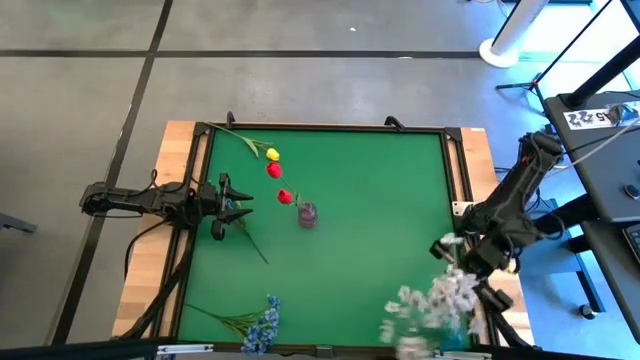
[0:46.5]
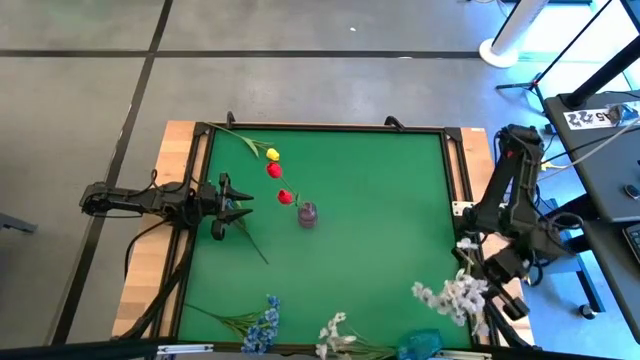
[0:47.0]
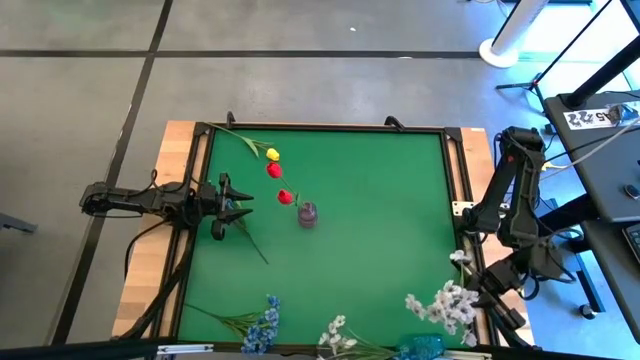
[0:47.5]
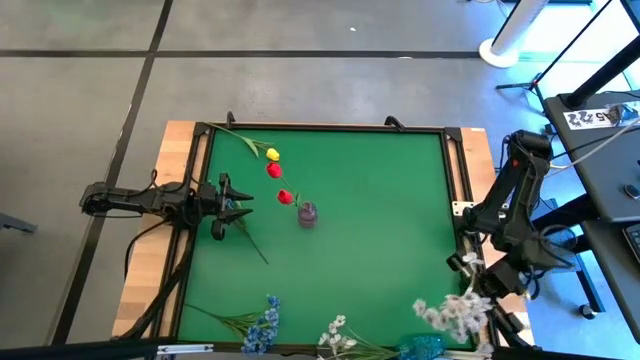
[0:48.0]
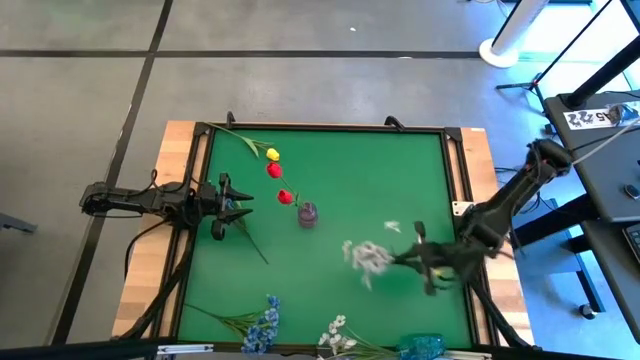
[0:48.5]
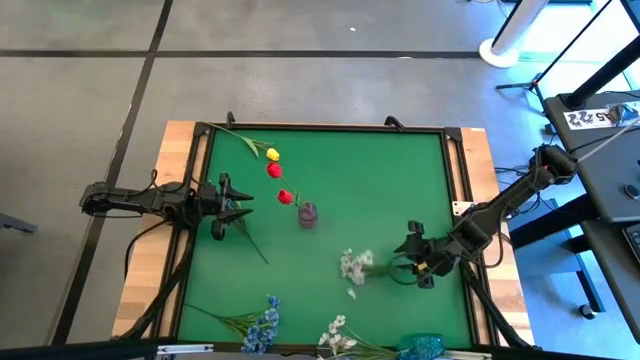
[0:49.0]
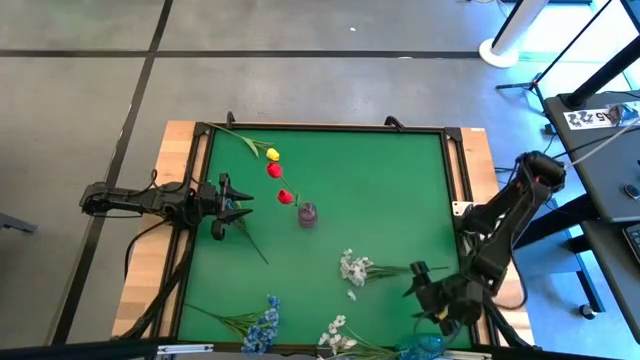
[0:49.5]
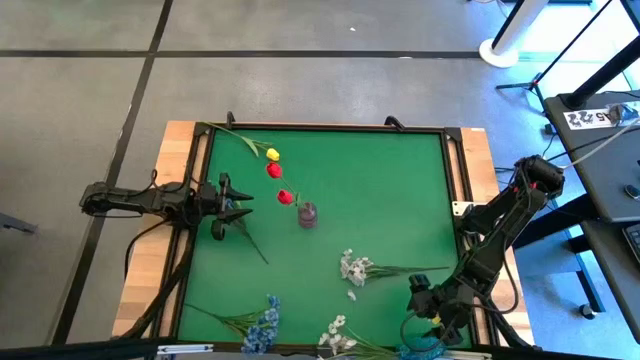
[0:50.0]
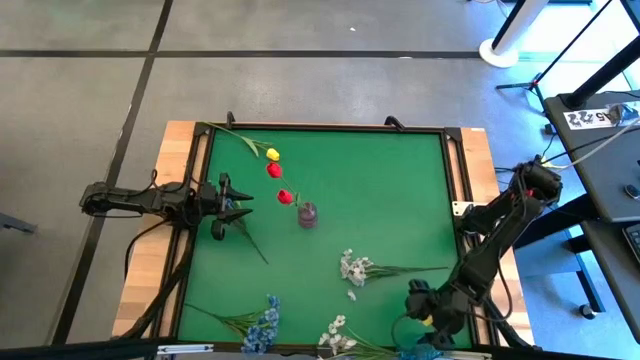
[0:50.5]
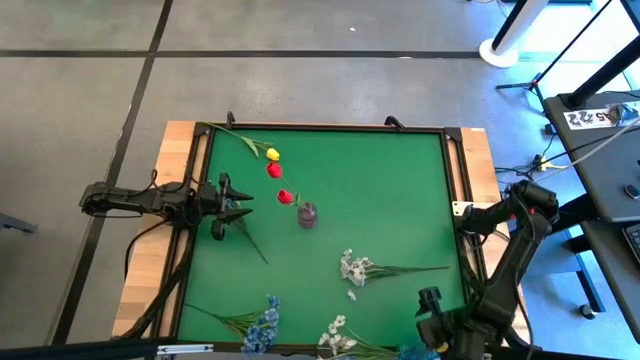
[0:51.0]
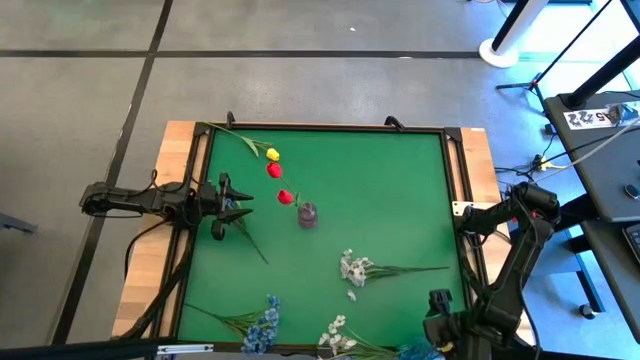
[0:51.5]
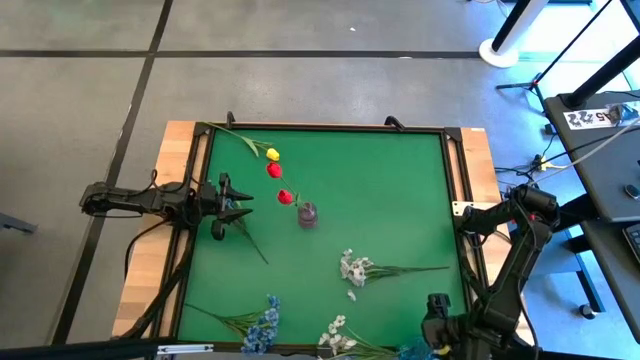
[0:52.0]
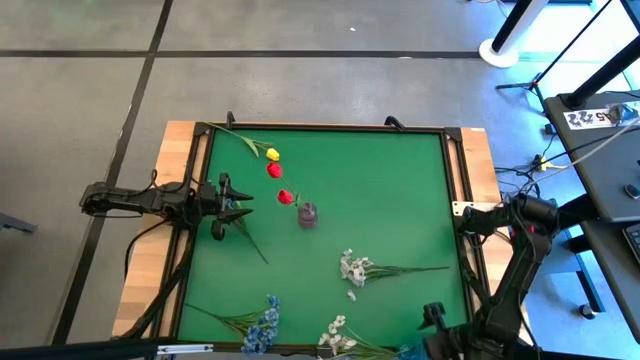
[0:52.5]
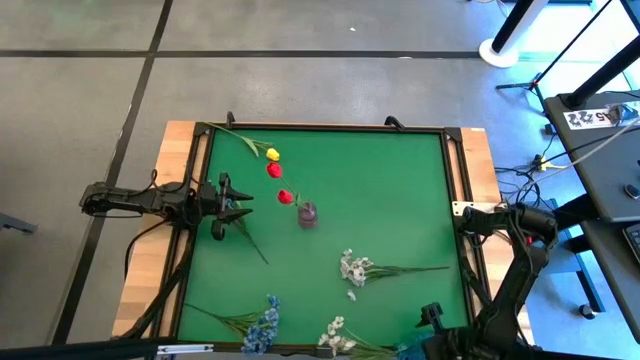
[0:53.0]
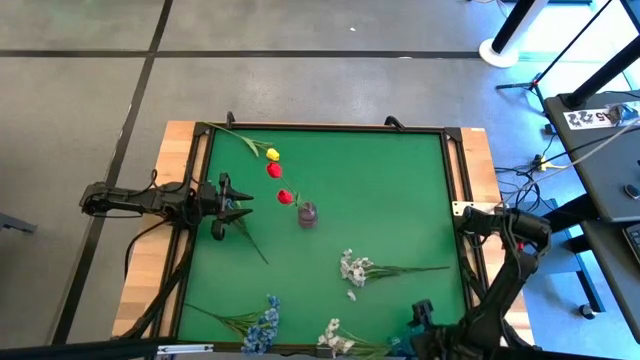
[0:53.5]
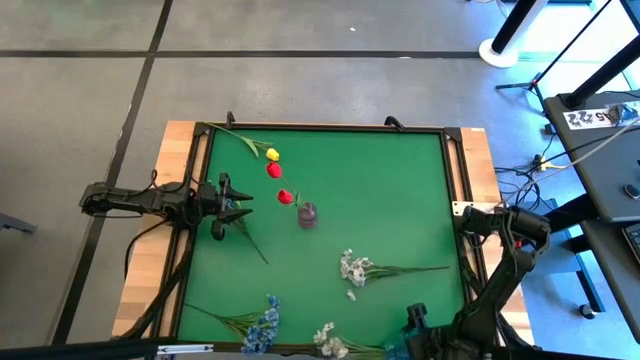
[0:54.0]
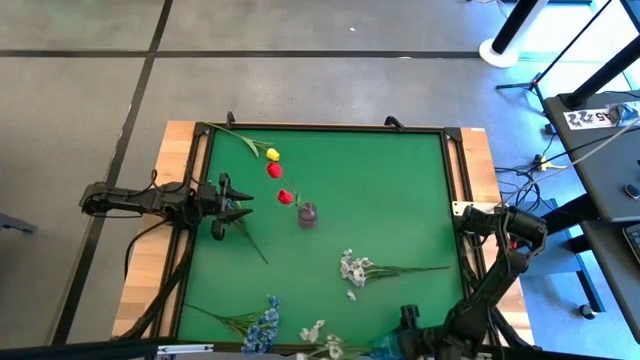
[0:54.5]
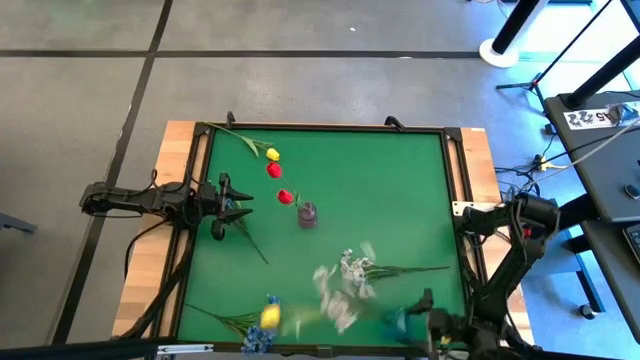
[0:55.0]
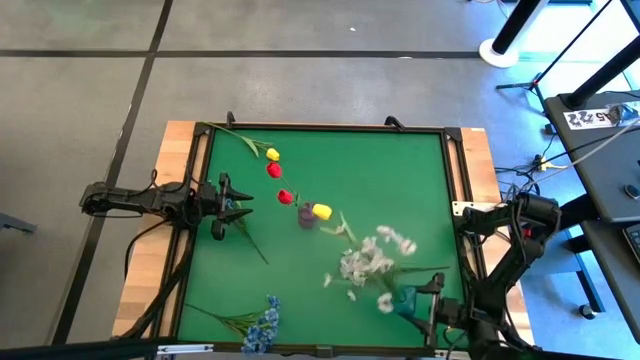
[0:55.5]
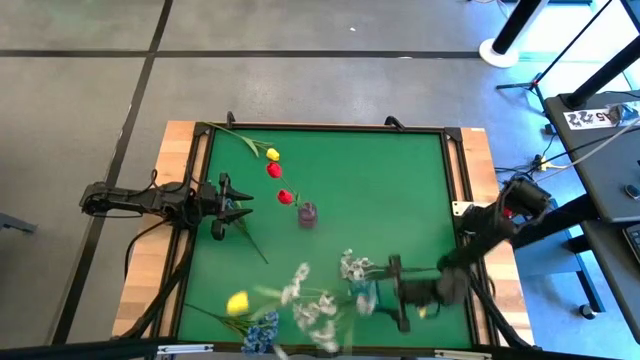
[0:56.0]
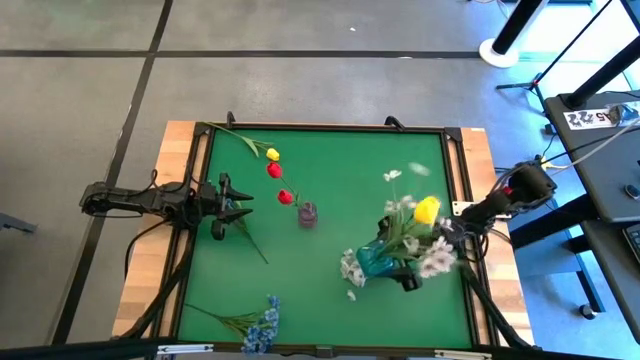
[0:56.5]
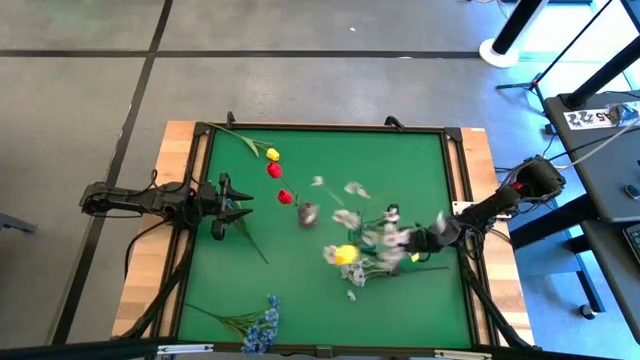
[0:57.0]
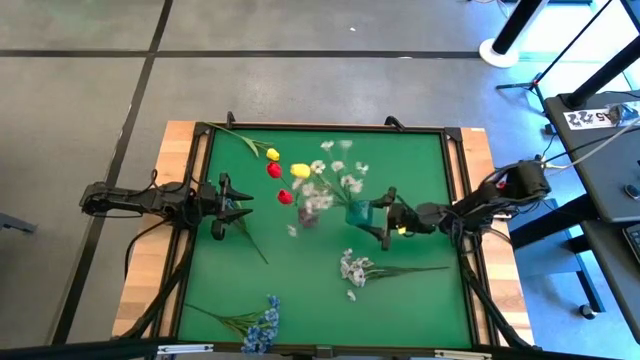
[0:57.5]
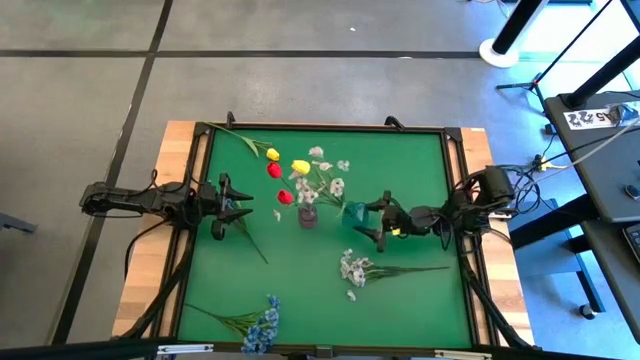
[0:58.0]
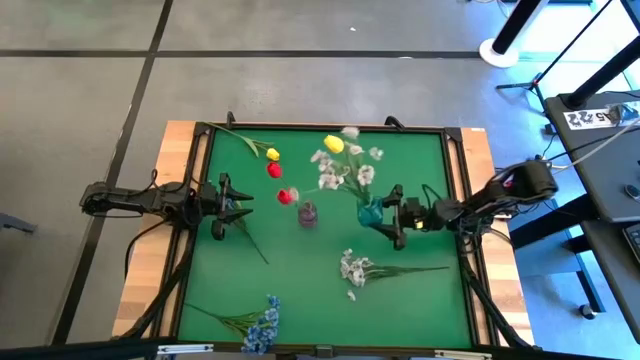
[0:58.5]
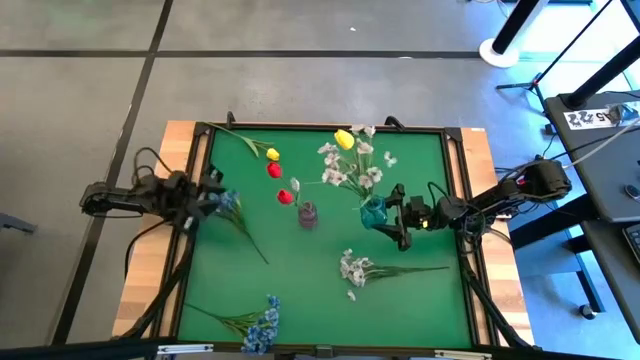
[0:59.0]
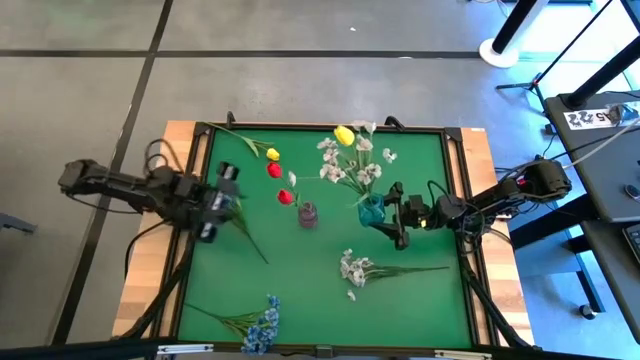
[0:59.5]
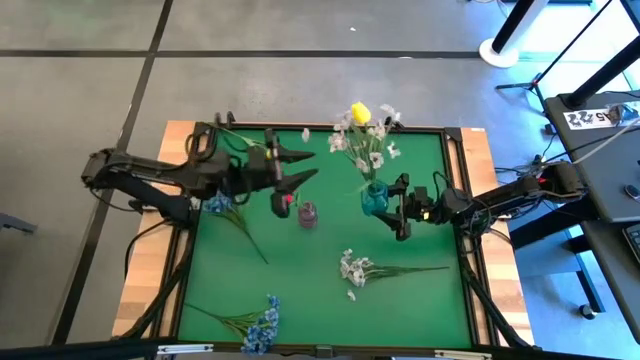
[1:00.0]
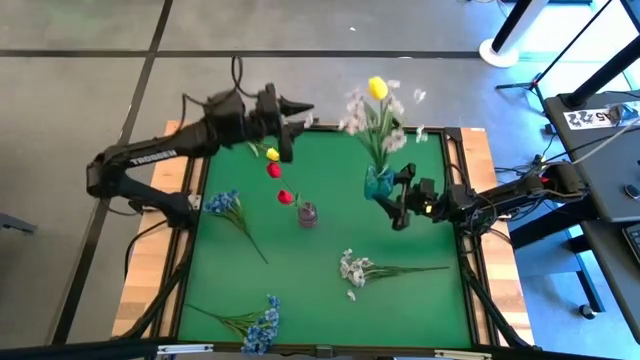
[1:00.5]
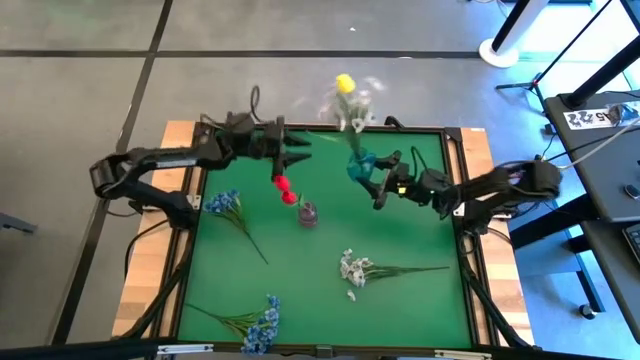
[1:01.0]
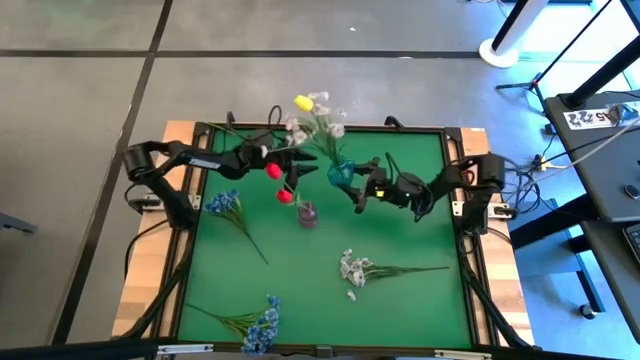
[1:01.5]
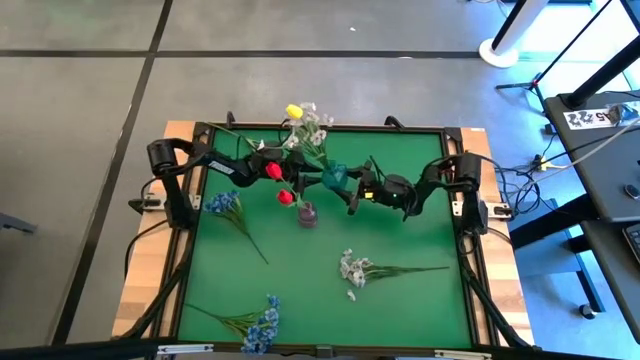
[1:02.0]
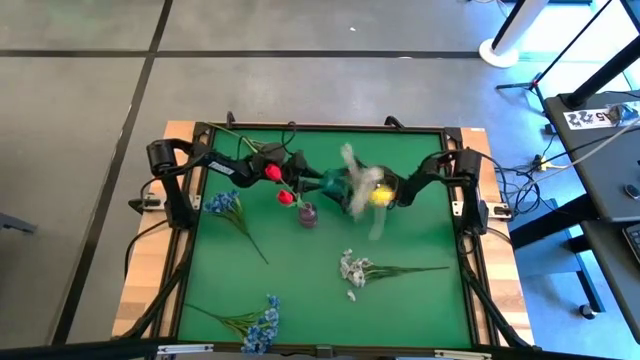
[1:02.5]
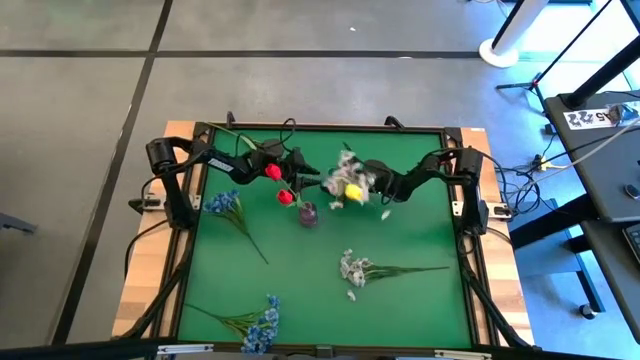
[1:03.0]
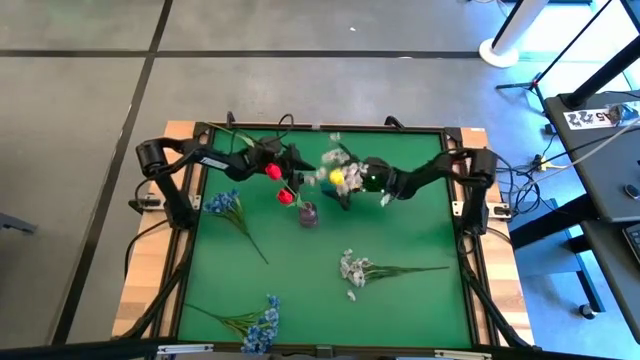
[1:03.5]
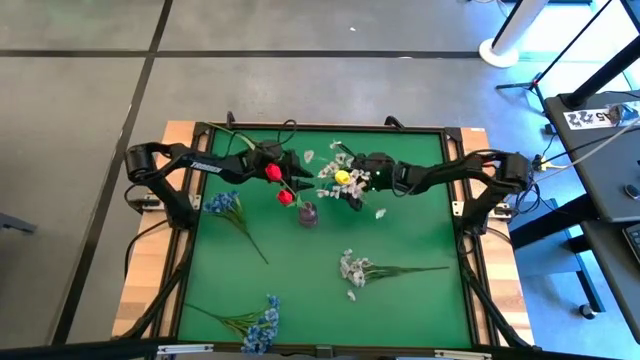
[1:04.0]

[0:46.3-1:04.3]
Task: Sort flowers into vase by color
Move the blue vase to the center of the table

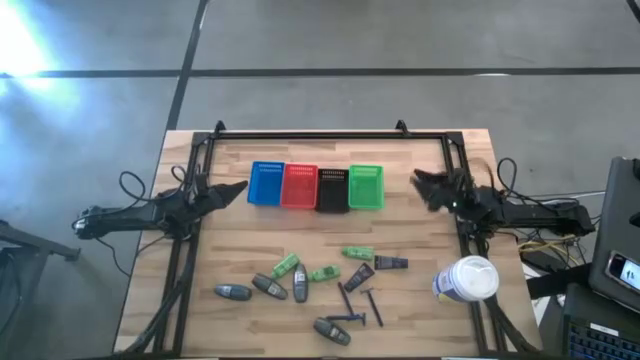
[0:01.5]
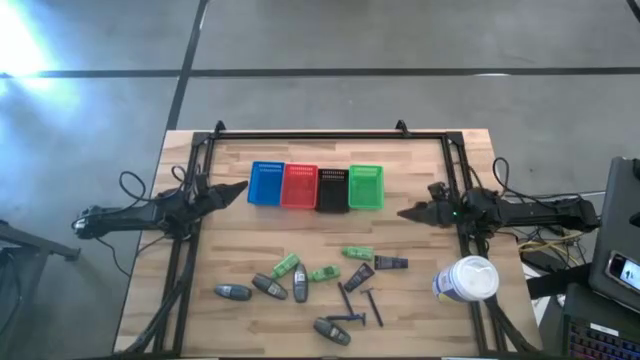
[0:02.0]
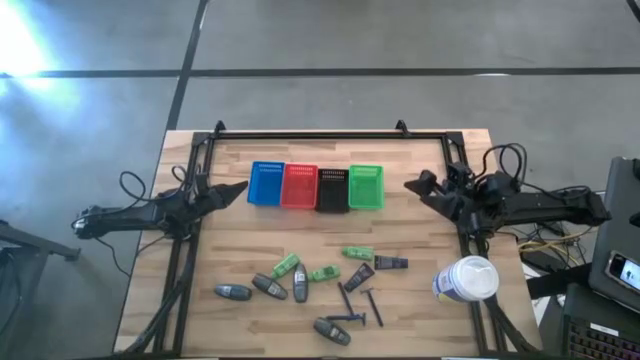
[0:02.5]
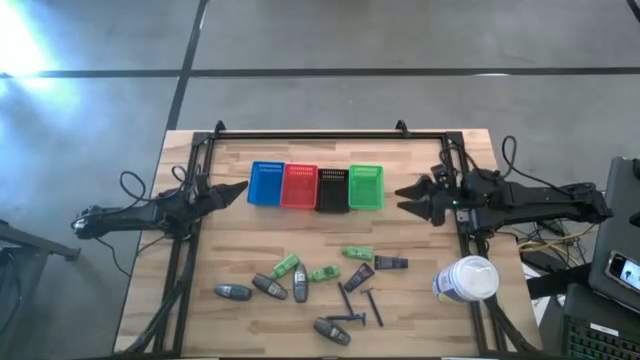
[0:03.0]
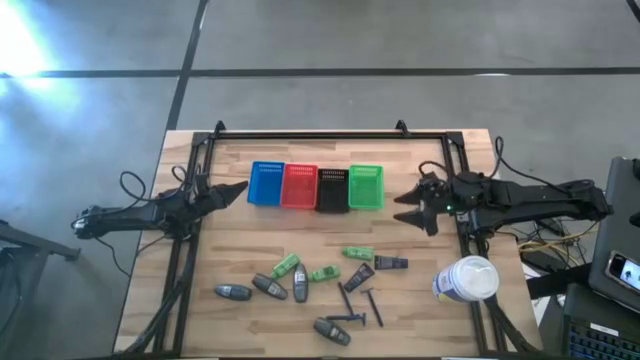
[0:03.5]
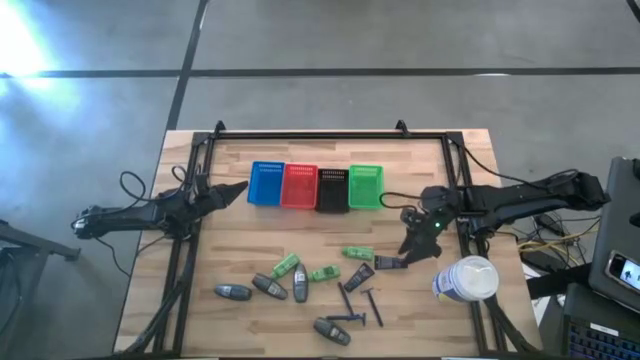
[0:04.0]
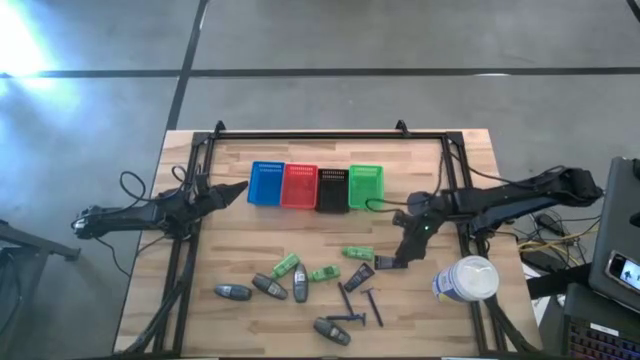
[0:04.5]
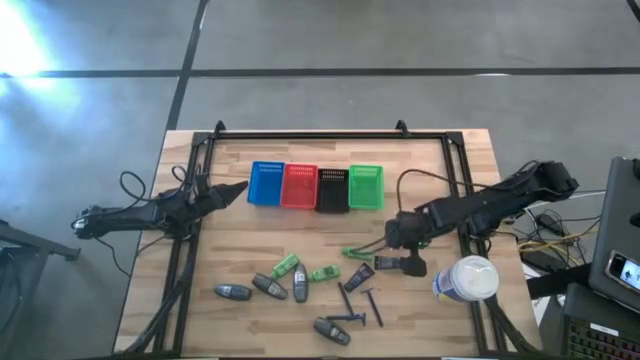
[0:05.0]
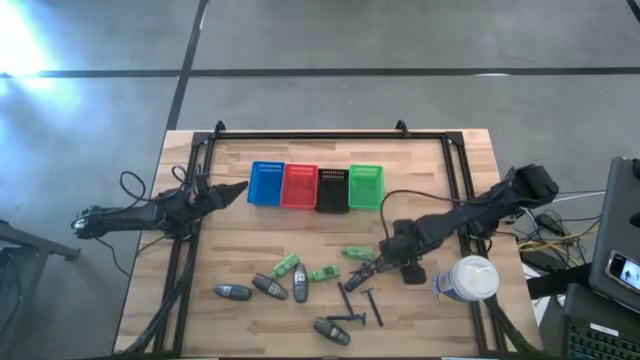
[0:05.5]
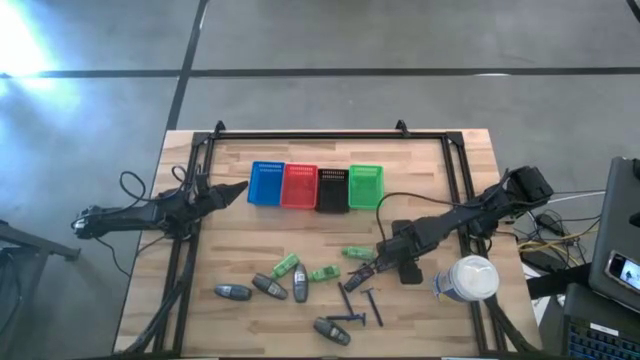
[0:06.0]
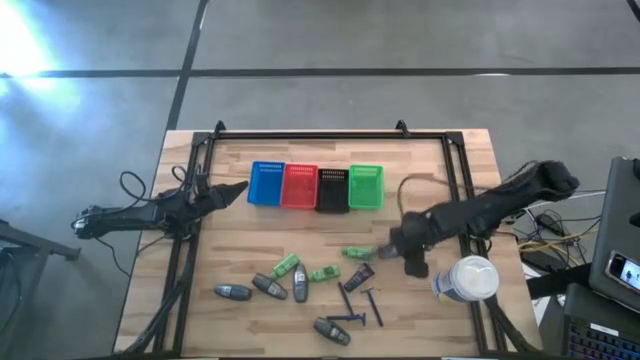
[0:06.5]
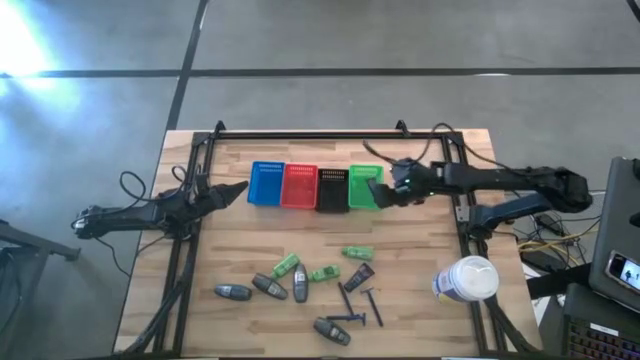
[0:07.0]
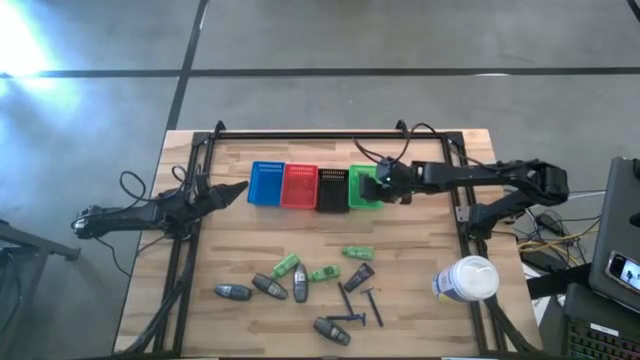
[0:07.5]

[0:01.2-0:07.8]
Task: Pick & Place Travel size toiletries
Put the right shave cream into the green basket
